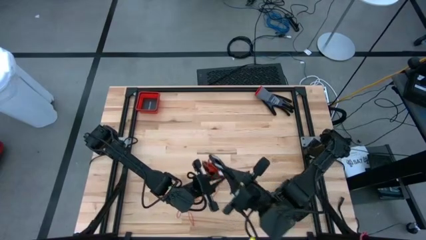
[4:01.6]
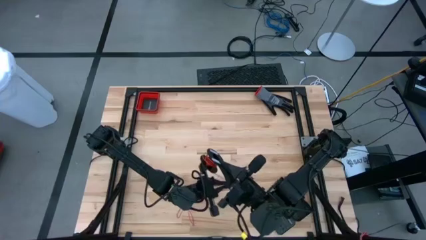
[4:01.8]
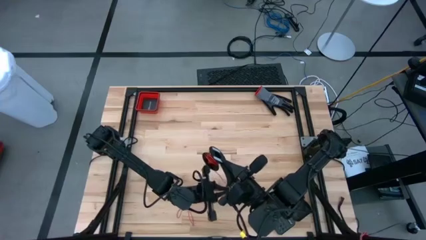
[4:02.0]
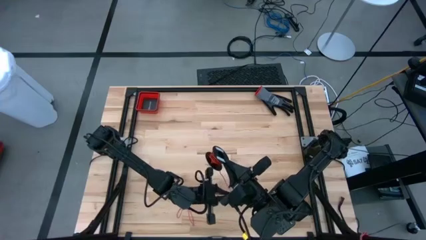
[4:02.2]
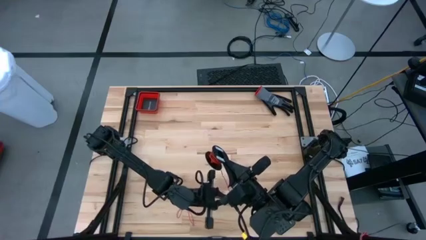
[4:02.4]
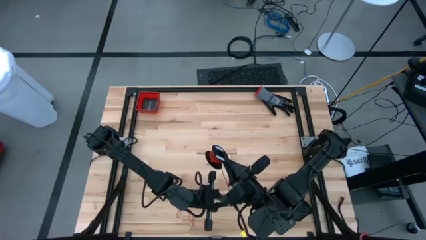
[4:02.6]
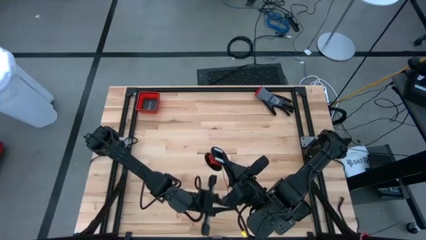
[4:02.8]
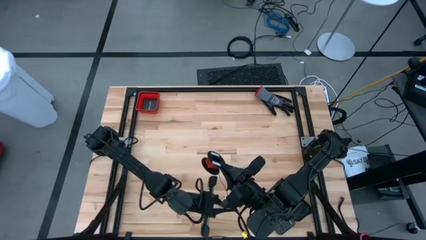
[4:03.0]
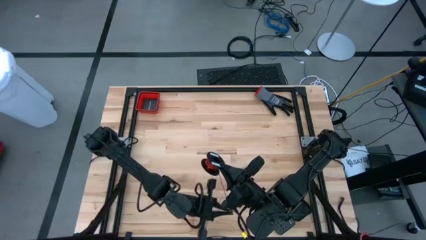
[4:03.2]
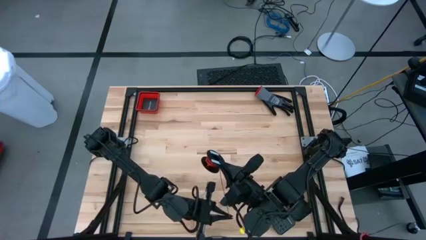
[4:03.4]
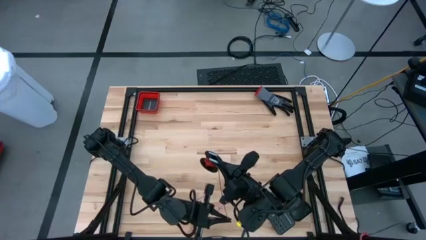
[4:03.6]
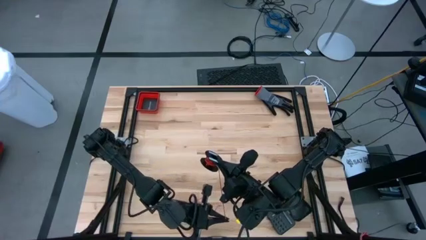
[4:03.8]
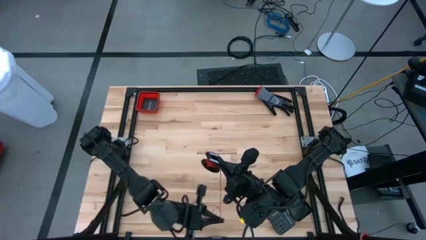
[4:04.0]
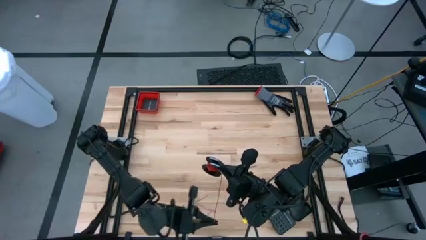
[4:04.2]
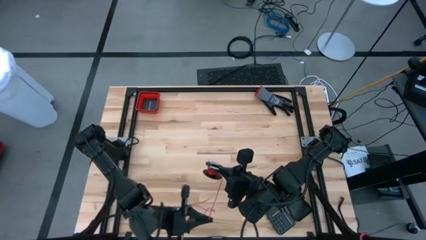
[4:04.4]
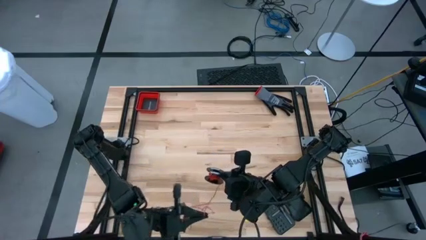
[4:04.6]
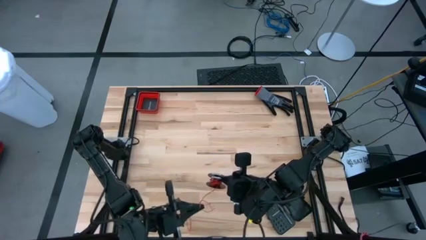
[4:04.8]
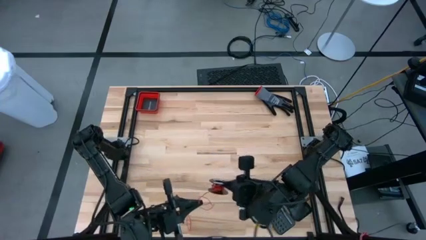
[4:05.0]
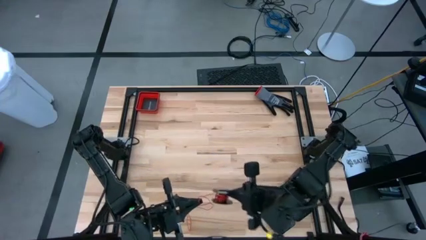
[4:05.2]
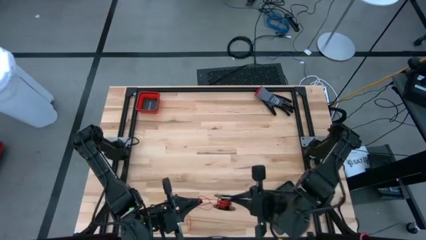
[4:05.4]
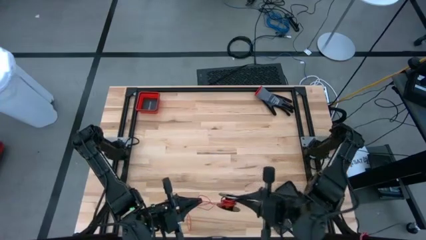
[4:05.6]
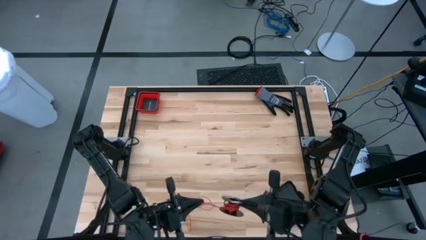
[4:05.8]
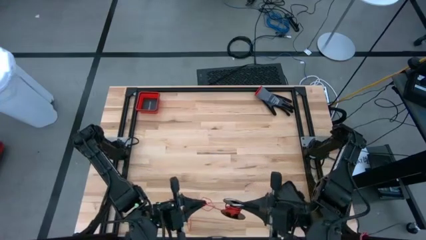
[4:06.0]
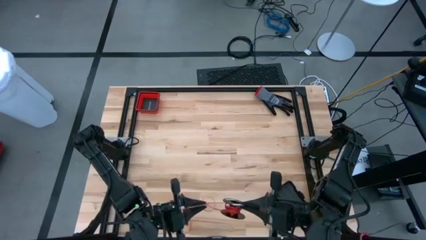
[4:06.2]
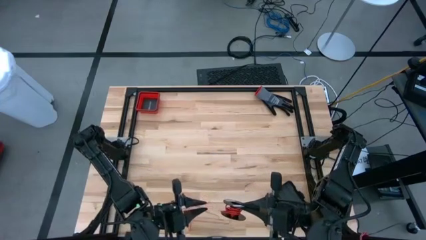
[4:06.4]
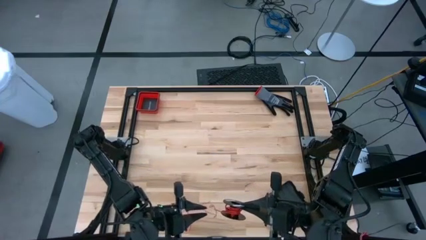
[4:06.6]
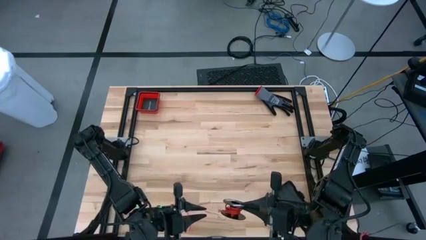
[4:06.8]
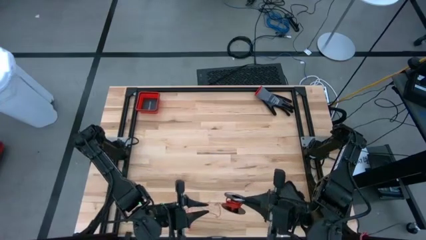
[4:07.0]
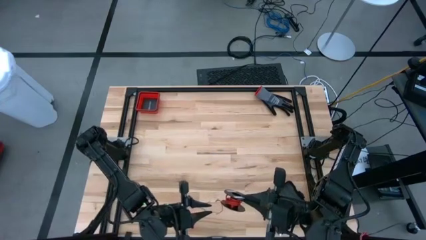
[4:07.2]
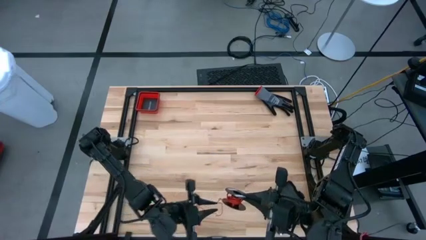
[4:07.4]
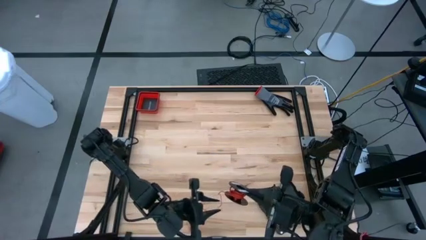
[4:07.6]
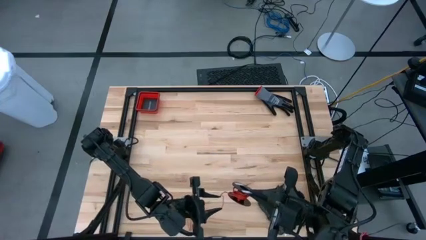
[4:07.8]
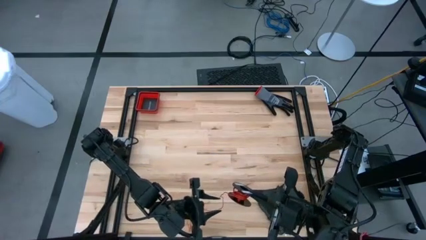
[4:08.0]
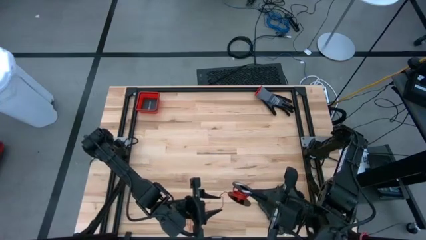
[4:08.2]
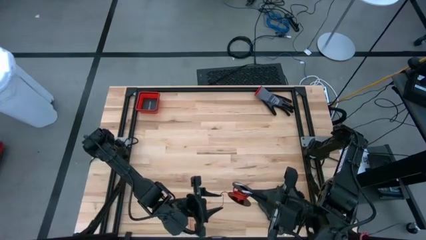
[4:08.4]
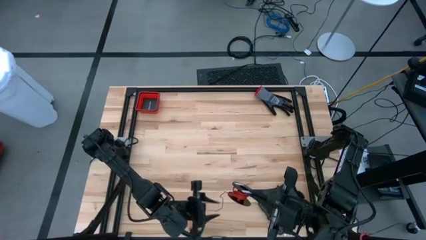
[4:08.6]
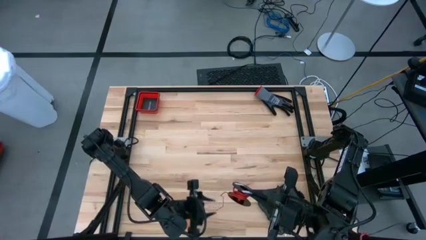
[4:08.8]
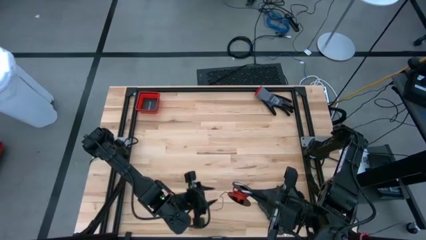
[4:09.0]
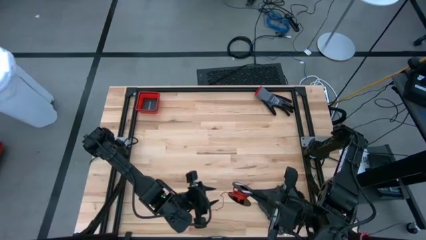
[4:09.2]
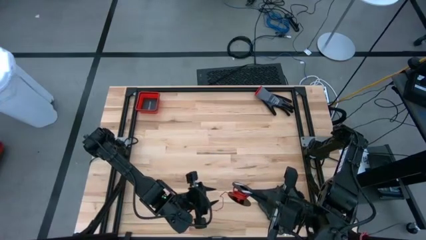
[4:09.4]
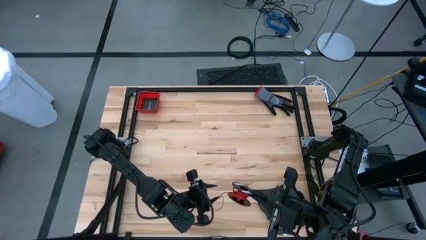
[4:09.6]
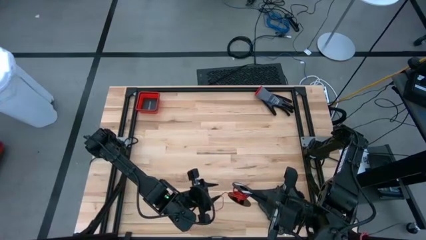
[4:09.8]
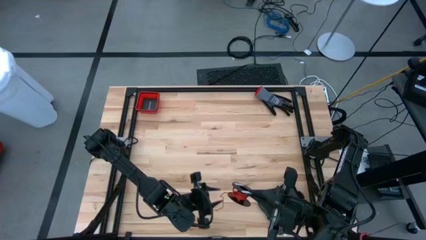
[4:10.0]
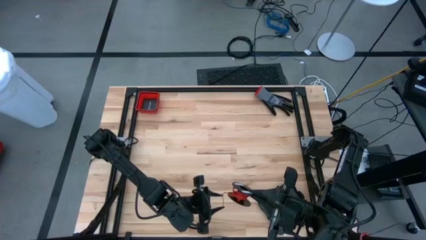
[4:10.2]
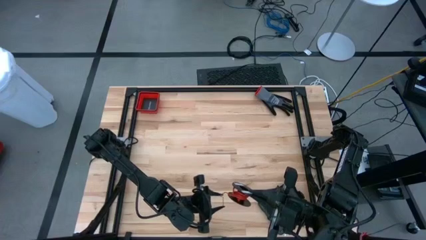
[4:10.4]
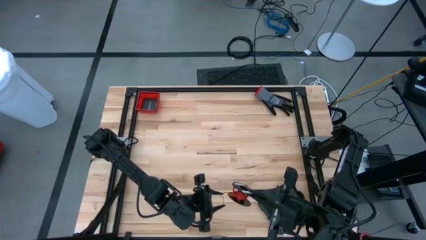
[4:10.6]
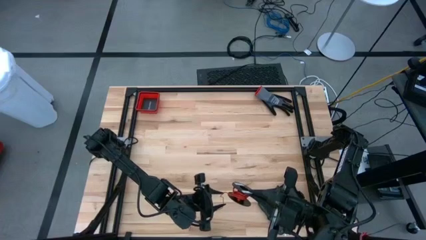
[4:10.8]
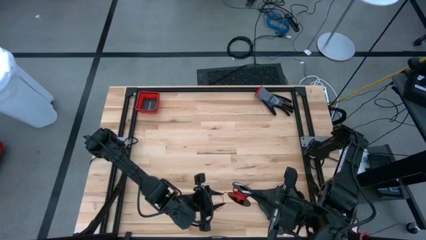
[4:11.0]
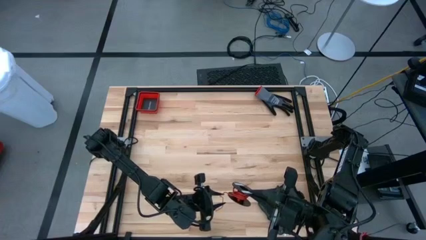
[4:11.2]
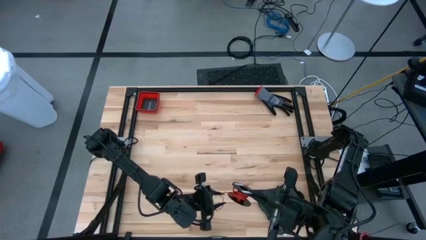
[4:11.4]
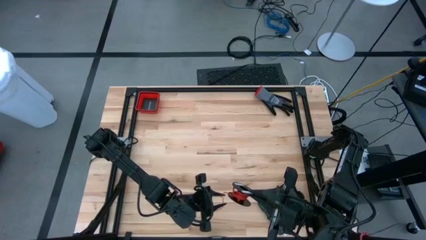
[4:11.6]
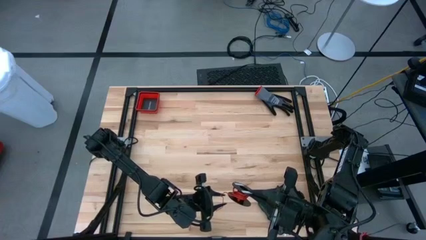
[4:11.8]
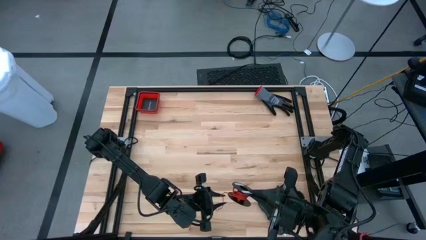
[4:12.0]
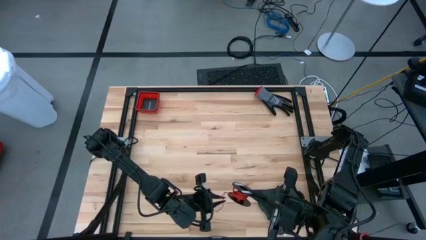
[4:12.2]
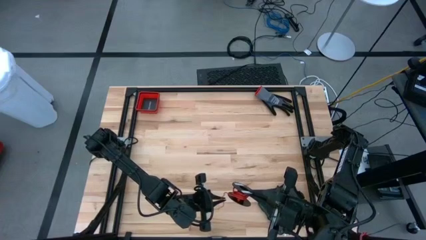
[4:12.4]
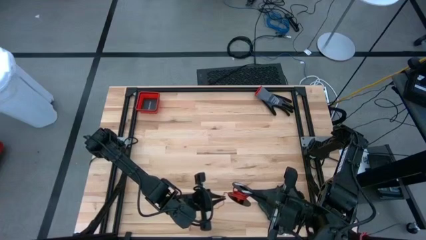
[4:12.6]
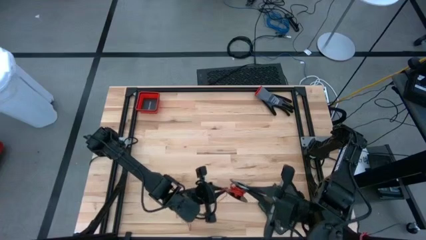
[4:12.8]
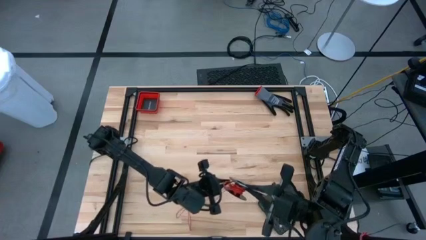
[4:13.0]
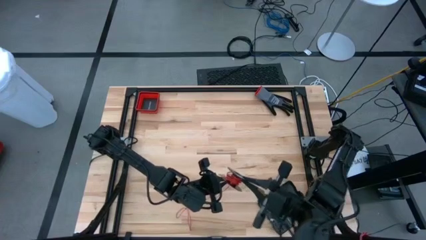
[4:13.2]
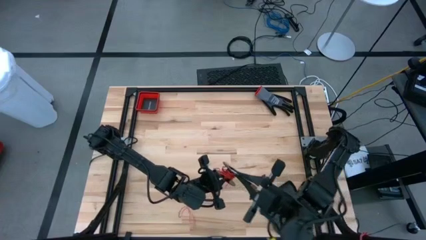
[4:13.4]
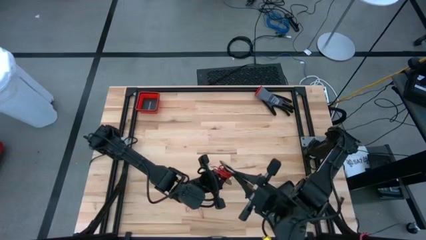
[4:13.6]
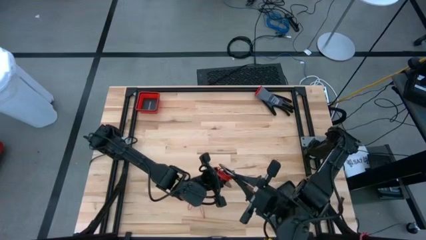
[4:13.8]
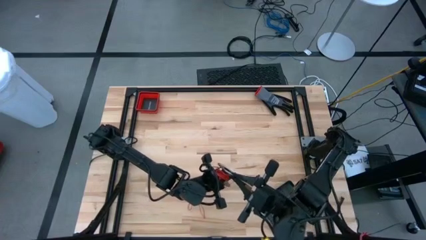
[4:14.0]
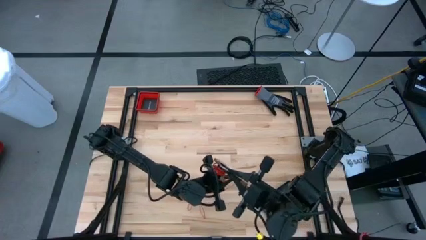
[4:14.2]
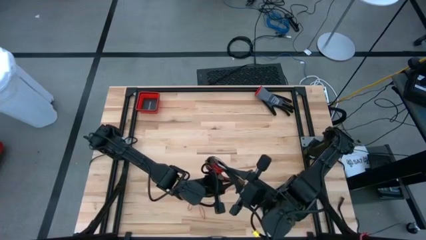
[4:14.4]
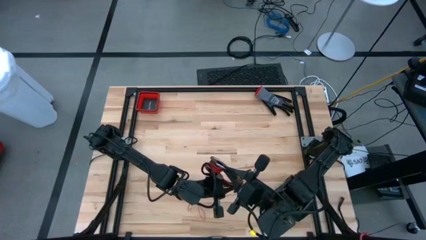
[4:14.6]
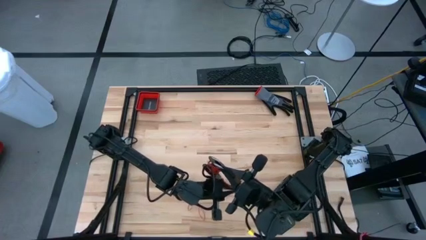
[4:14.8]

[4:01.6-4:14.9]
Task: Coil cords
Coil the red wire onto the spool
